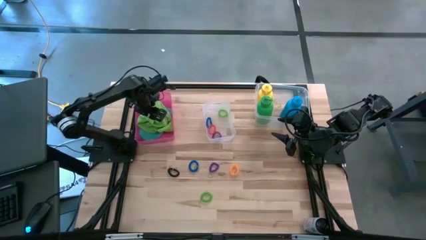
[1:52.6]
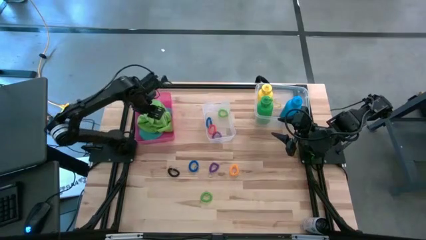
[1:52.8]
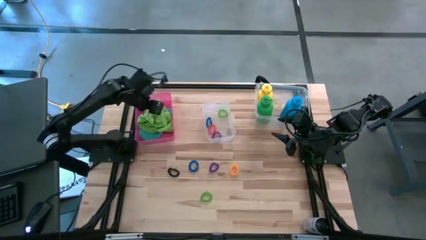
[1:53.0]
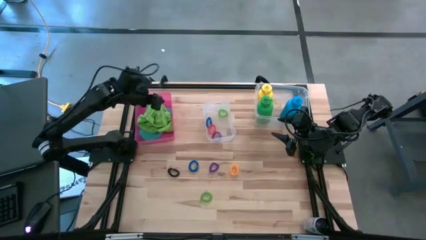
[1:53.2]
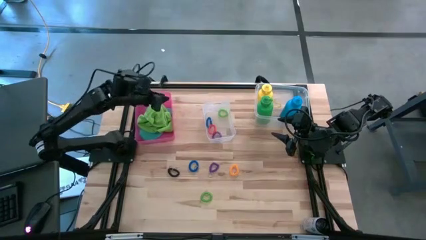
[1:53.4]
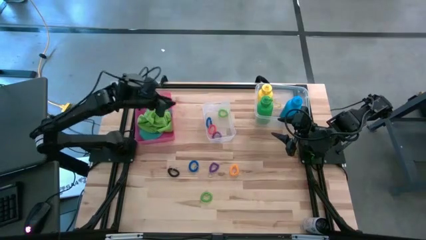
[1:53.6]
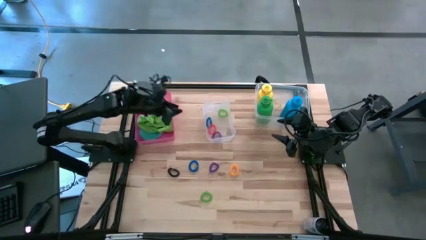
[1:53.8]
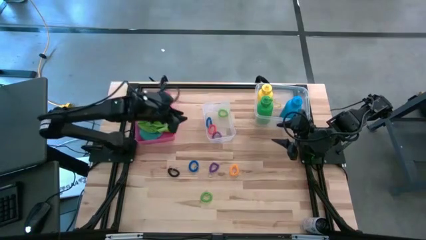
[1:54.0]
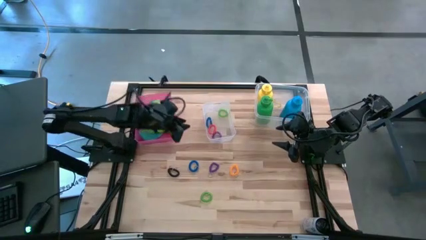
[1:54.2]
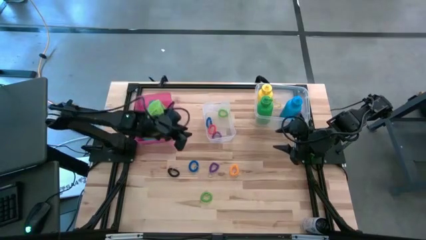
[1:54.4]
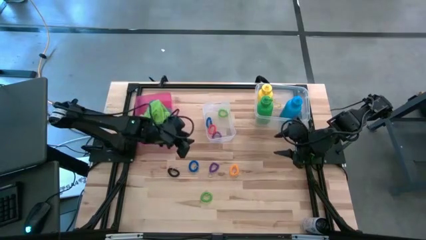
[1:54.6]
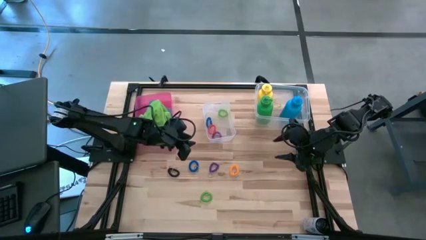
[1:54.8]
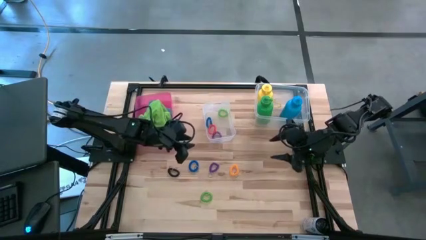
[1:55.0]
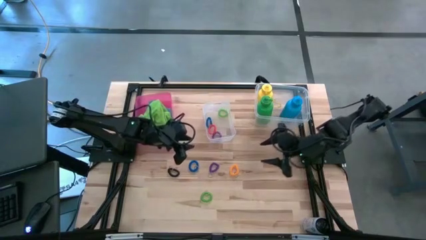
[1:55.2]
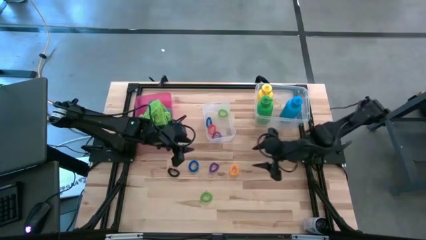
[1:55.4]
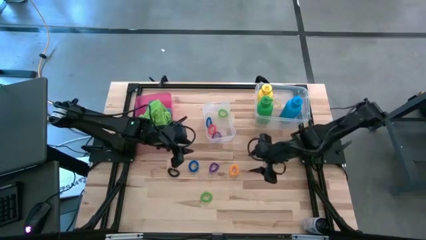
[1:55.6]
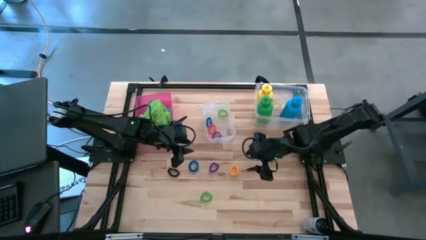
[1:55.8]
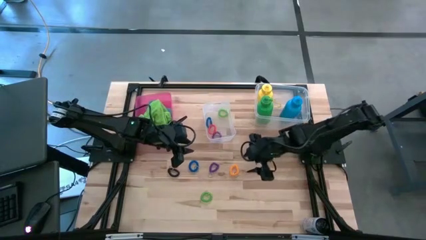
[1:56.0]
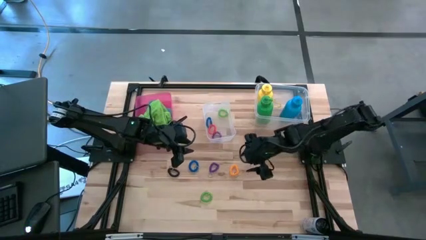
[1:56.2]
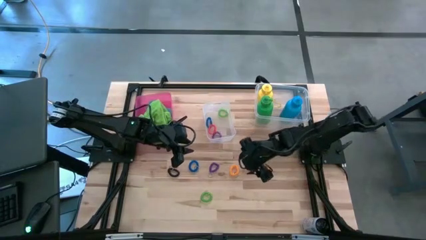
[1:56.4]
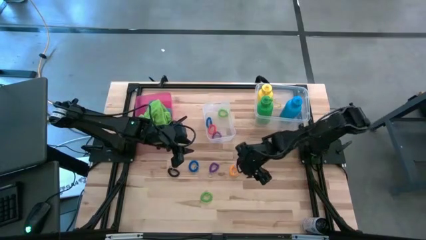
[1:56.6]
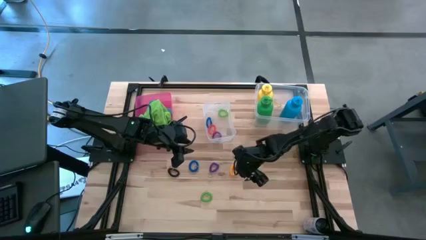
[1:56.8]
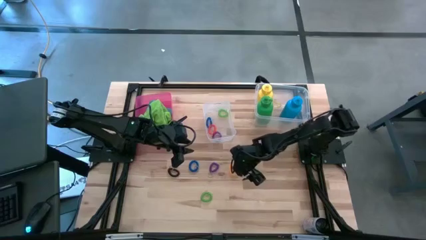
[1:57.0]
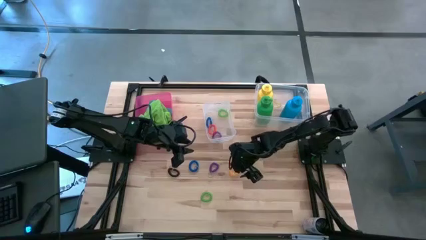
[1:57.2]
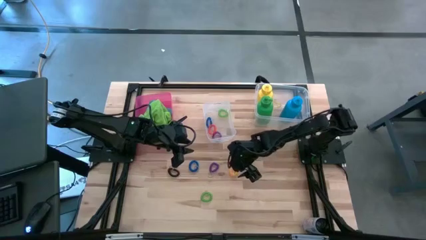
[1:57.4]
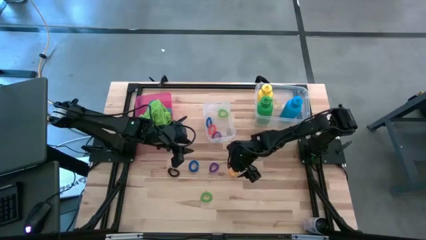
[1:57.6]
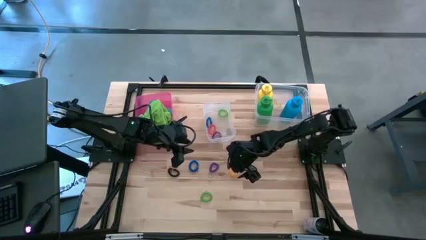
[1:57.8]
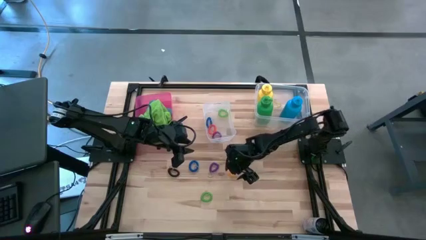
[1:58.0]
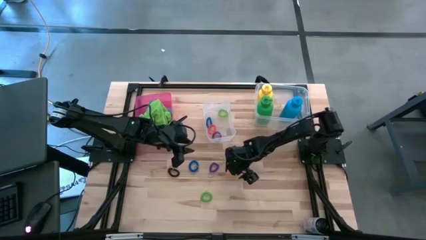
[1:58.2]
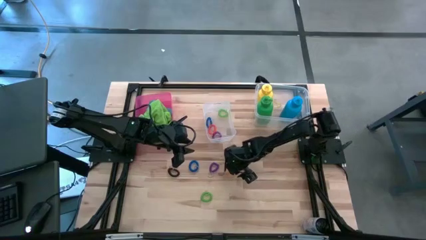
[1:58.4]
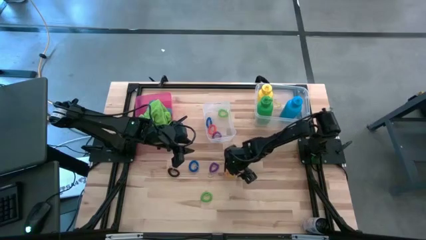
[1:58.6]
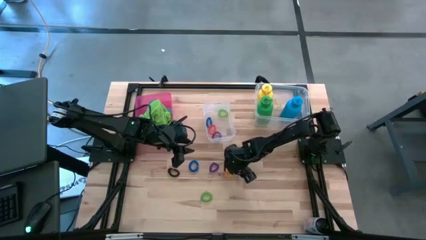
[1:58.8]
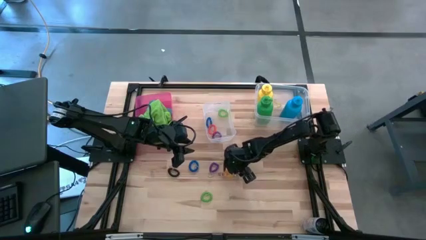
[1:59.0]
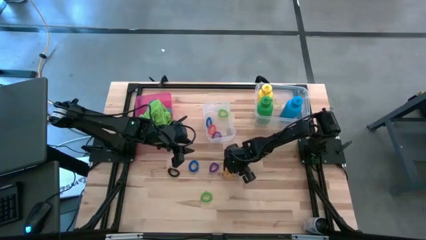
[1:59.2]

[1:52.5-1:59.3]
Task: Pick & Place Sports Items
Put the yellow spring keychain into the left transparent bin

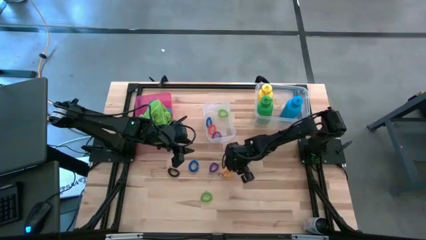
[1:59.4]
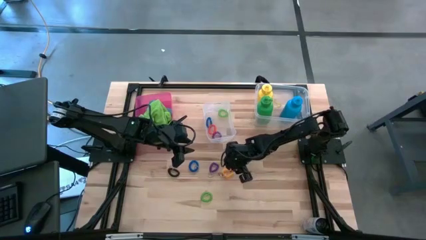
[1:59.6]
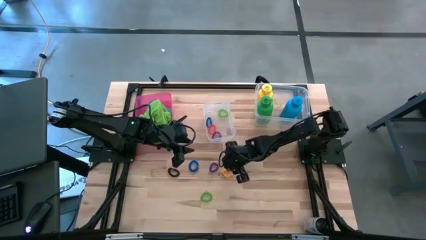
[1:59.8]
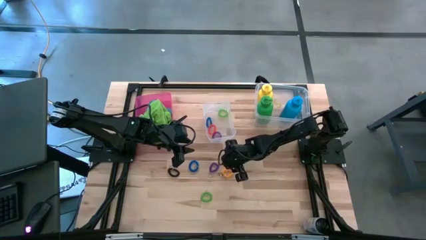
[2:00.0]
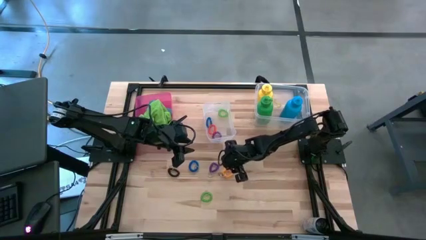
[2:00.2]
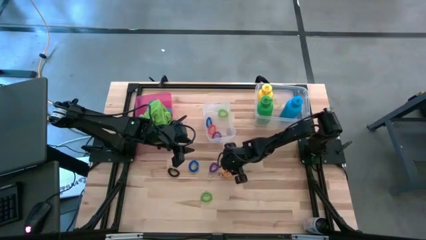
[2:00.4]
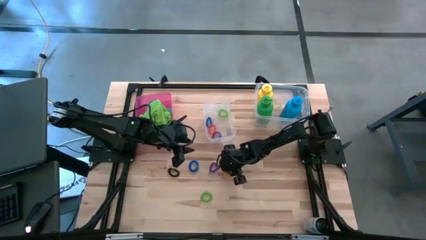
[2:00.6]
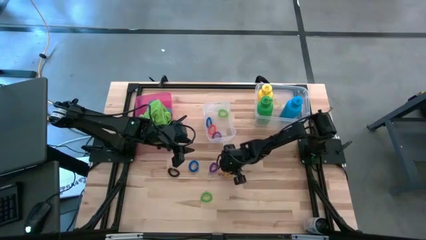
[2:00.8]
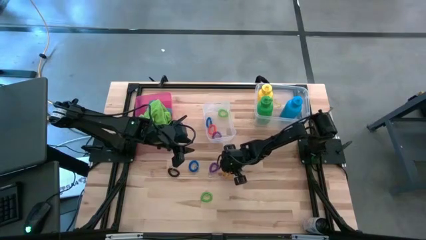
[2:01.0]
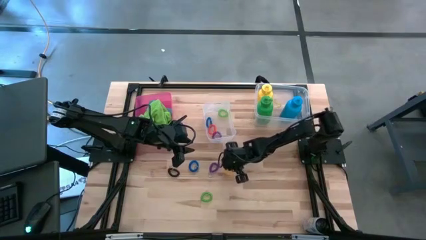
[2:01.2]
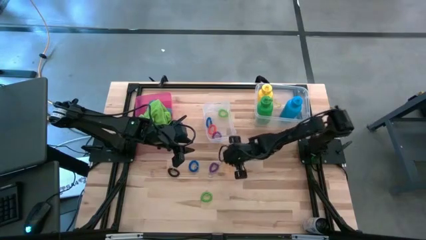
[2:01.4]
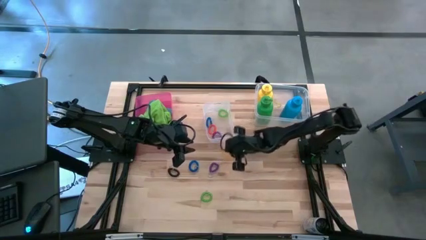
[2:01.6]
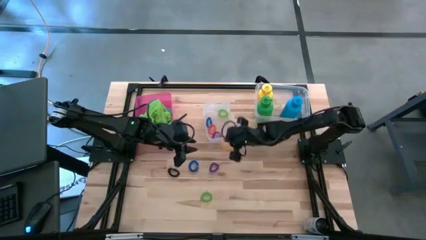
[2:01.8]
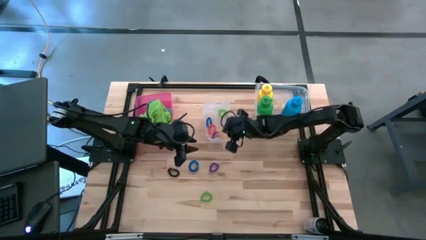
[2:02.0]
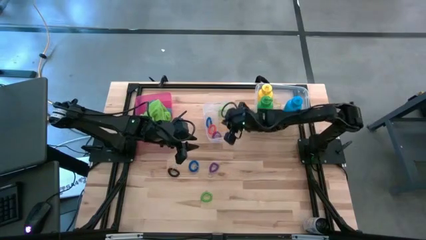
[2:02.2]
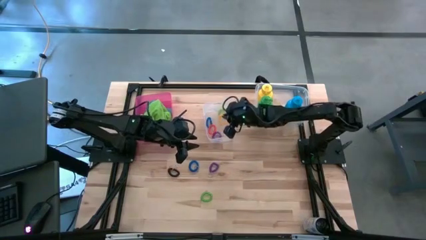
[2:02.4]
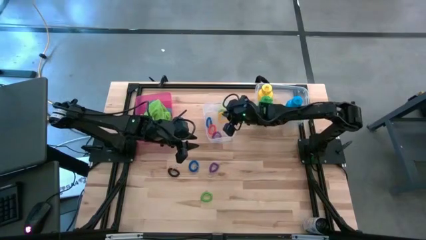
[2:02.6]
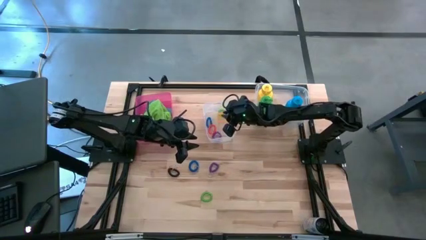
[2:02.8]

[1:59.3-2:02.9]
Put the yellow spring keychain into the left transparent bin

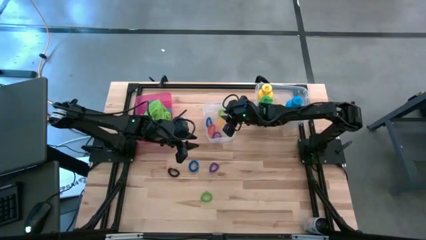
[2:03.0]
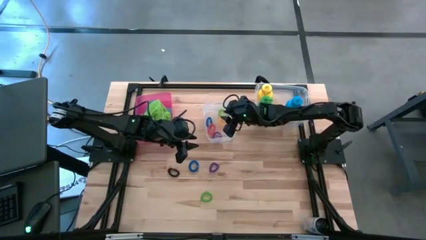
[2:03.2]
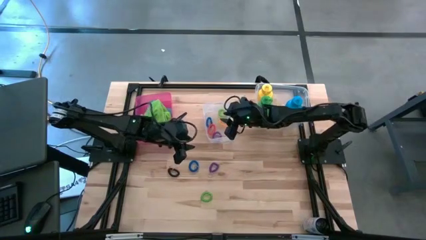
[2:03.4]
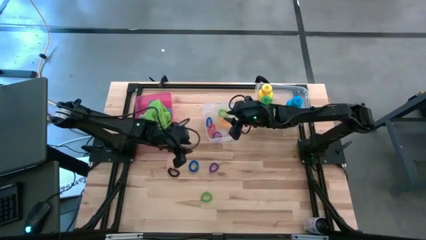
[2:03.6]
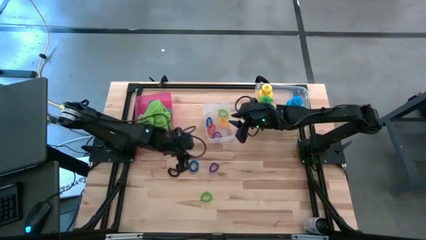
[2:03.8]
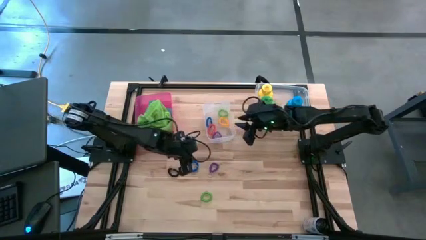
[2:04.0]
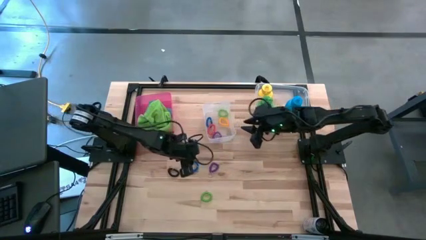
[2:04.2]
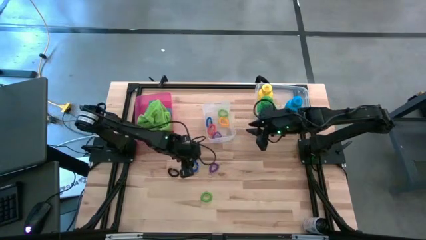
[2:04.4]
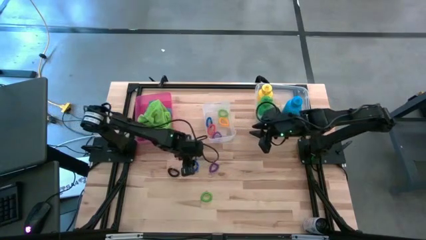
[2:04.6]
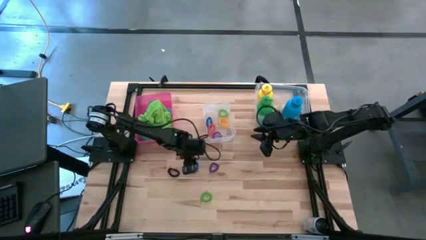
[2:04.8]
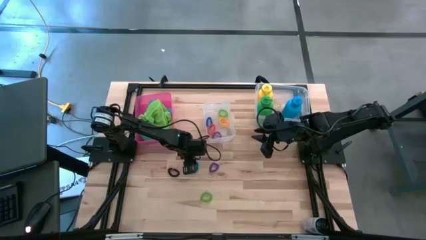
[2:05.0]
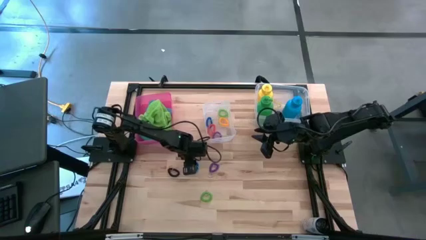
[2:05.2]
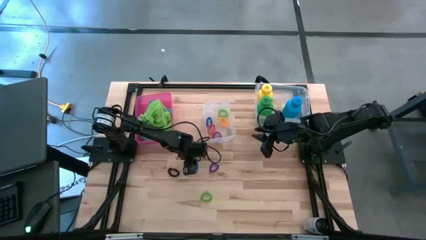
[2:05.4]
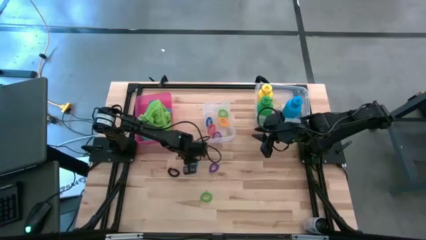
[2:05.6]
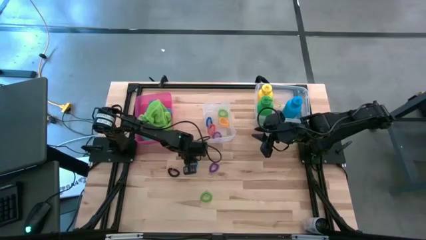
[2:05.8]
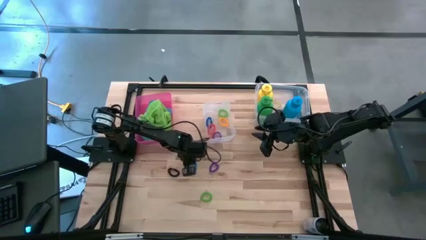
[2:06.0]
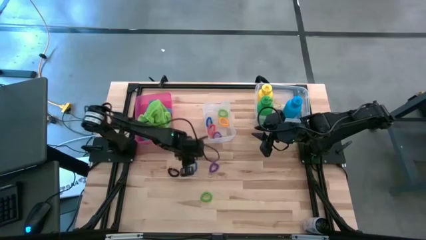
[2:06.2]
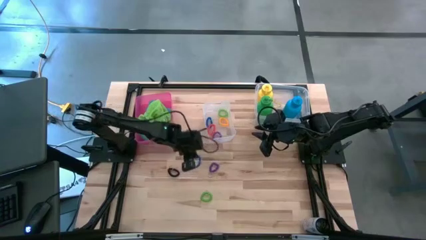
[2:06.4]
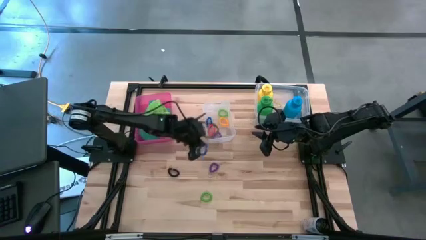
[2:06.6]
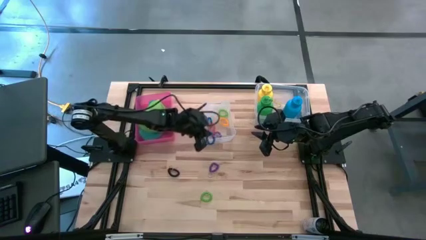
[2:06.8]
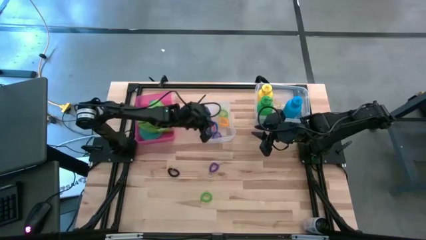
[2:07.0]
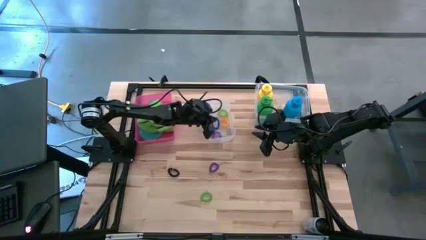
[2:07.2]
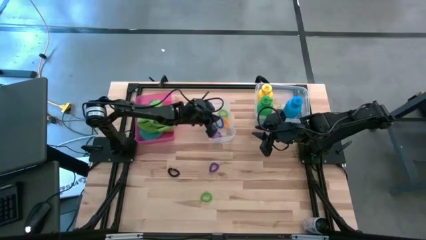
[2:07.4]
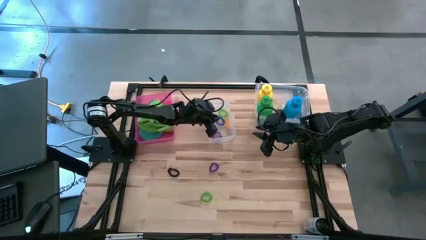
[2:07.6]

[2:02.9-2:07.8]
Put the blue spring keychain into the left transparent bin

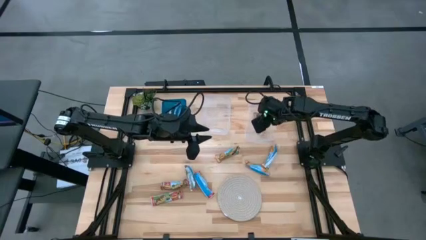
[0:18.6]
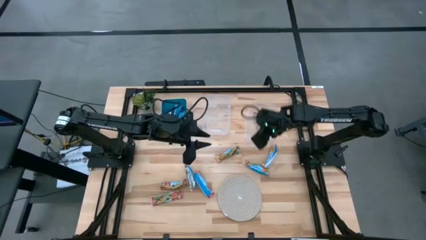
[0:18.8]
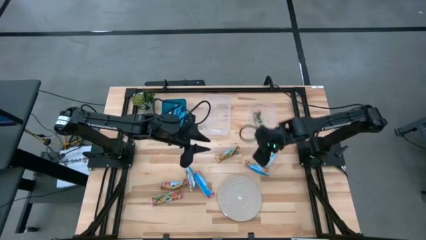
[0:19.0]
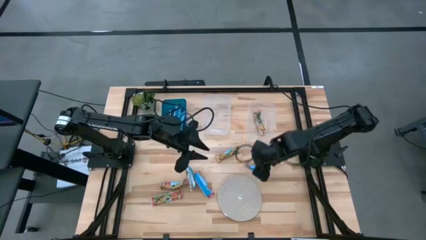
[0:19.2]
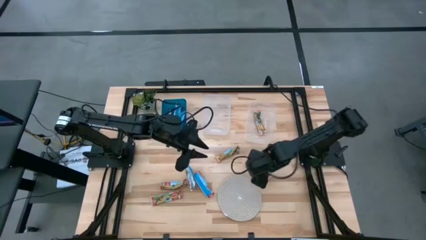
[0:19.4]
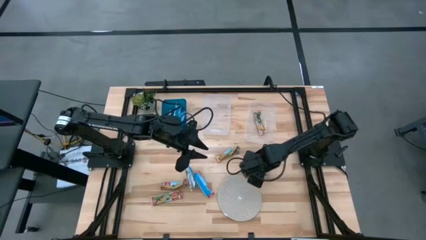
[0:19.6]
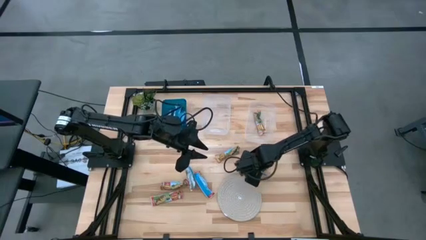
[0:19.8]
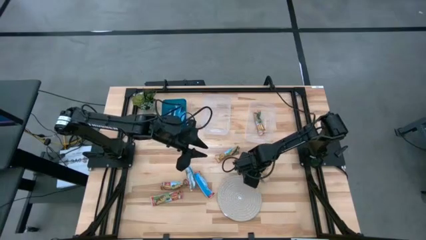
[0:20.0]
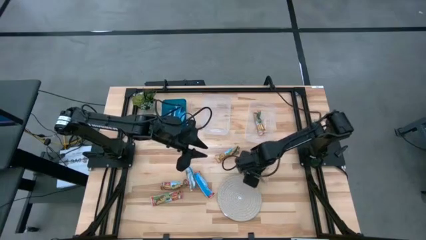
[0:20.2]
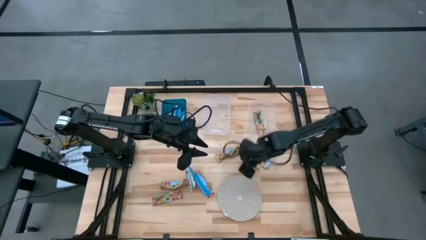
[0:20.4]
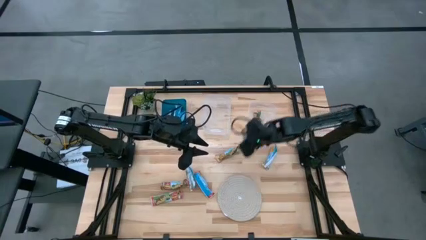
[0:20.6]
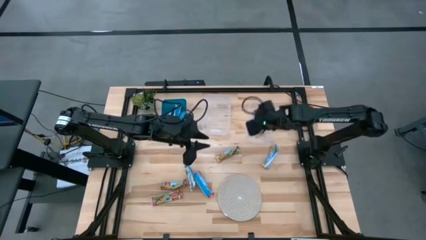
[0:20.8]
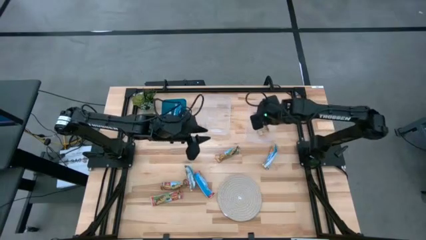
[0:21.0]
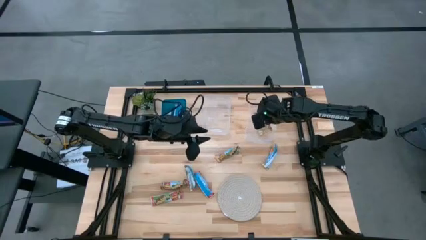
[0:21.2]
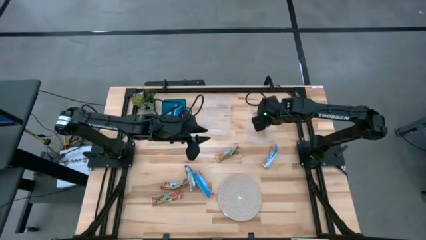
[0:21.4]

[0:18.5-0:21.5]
Task: Pick and place Granola Bars by type
Put the yellow granola bar into the right transparent bin
